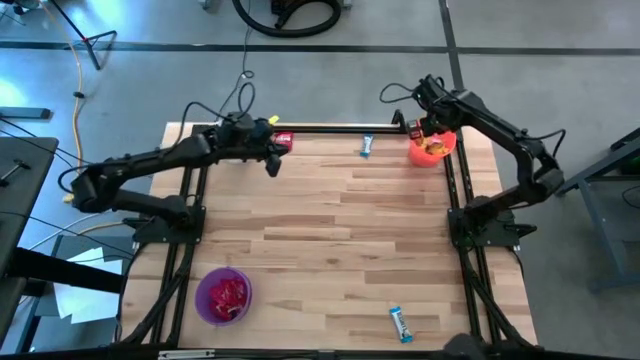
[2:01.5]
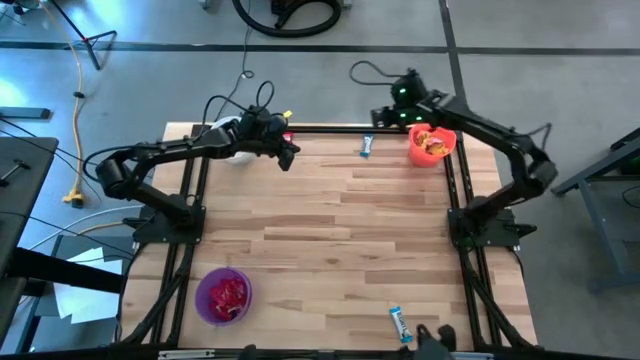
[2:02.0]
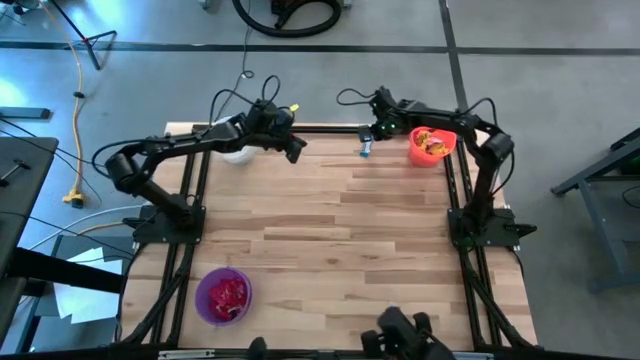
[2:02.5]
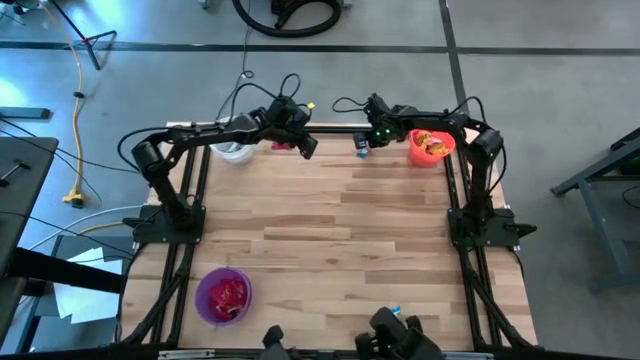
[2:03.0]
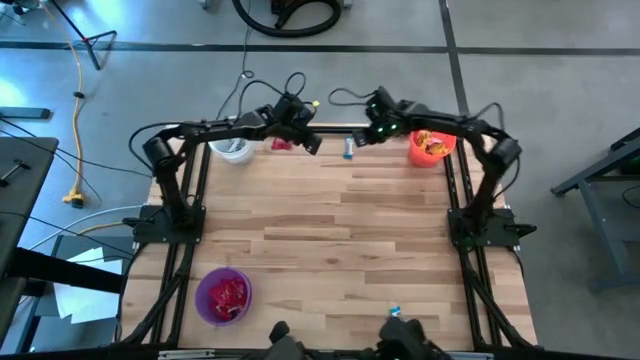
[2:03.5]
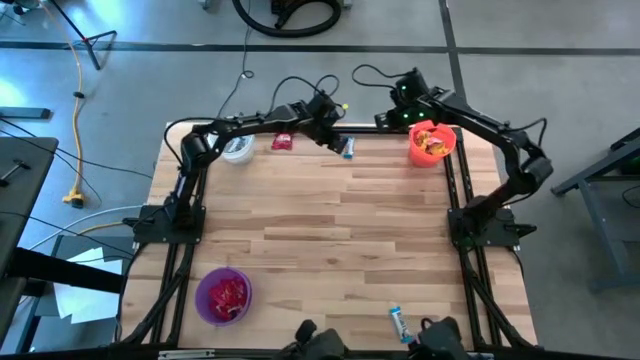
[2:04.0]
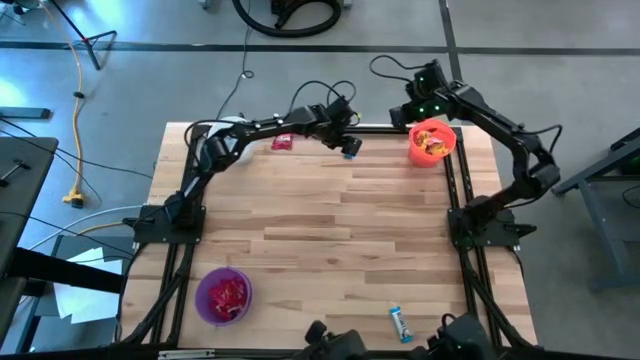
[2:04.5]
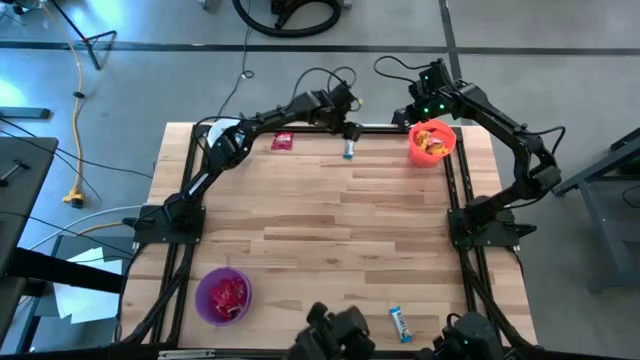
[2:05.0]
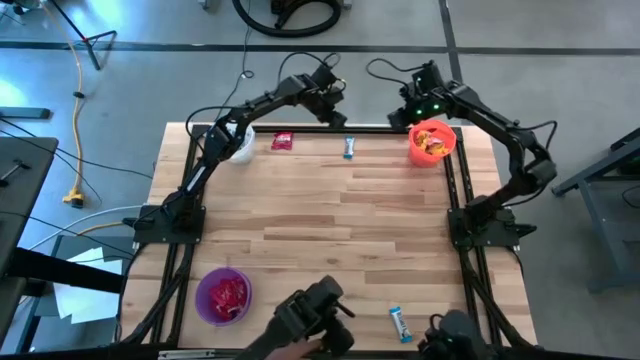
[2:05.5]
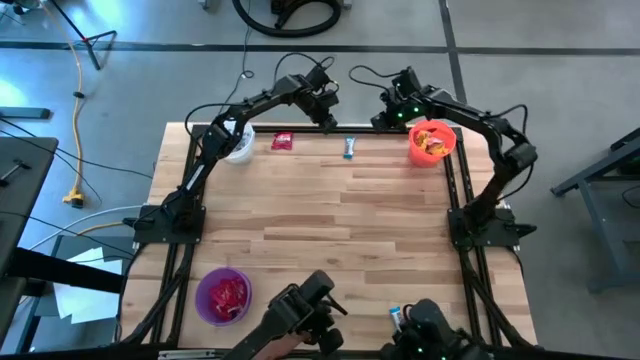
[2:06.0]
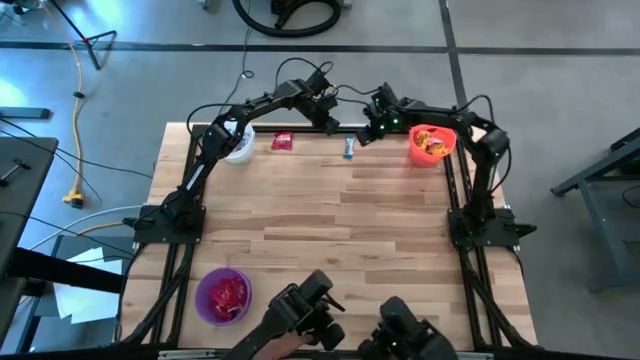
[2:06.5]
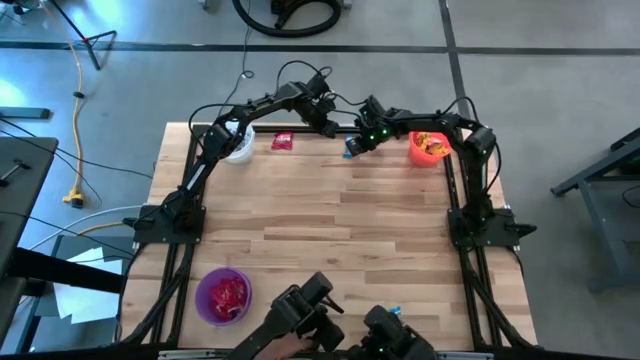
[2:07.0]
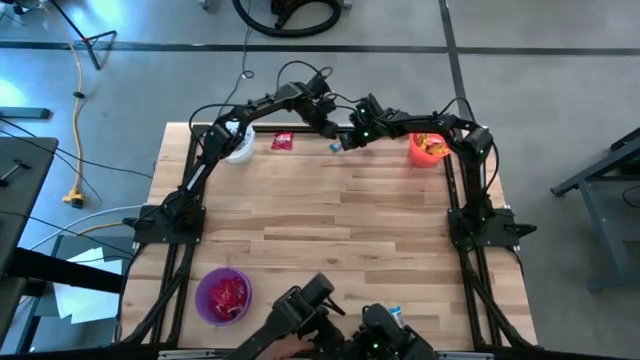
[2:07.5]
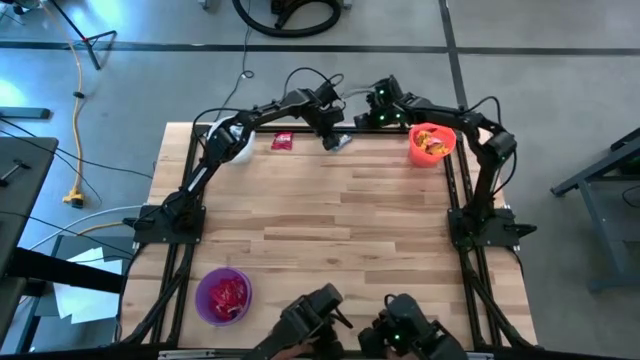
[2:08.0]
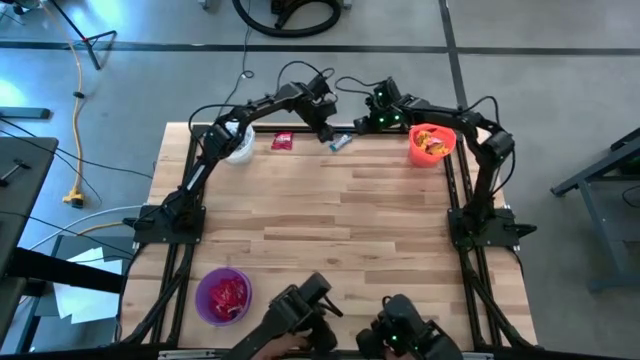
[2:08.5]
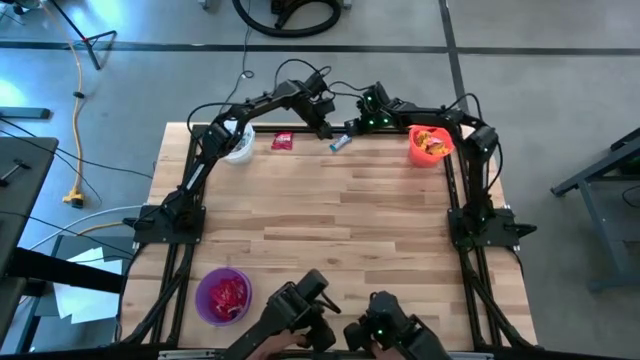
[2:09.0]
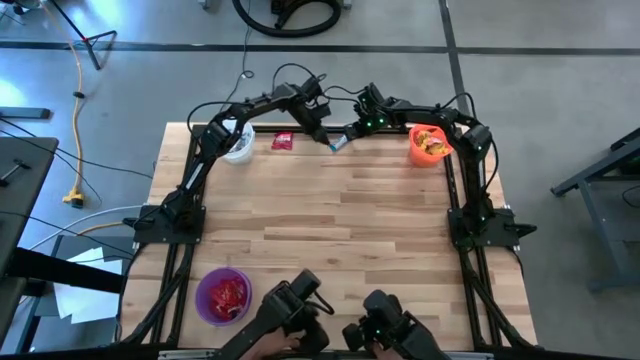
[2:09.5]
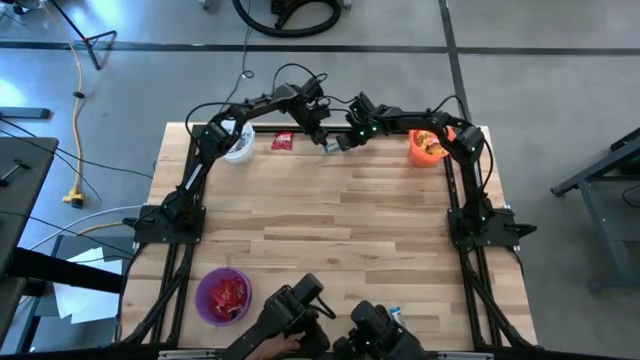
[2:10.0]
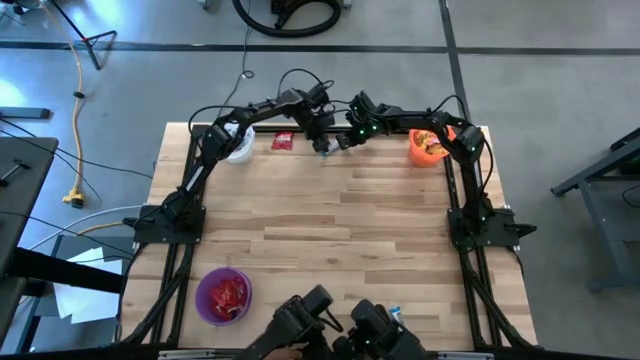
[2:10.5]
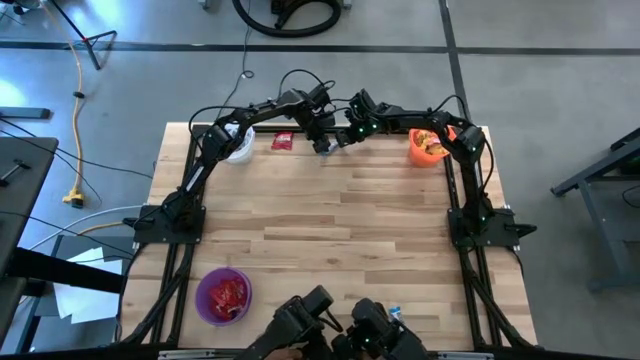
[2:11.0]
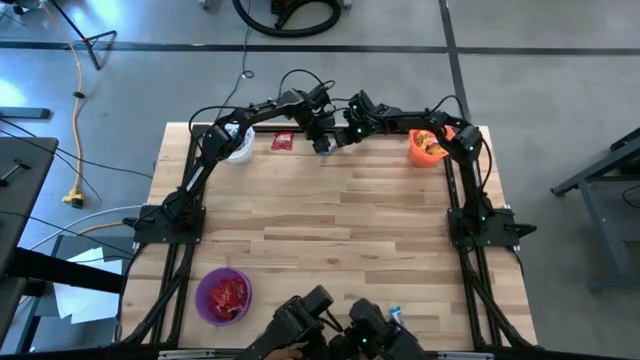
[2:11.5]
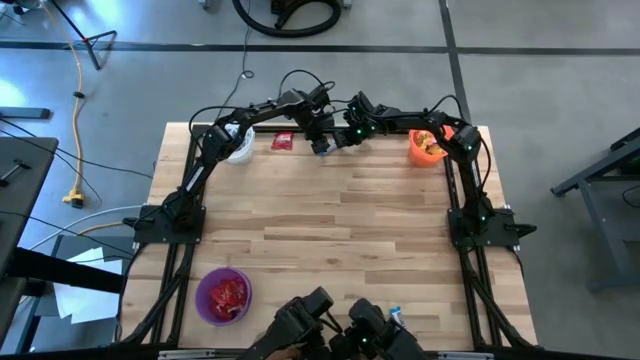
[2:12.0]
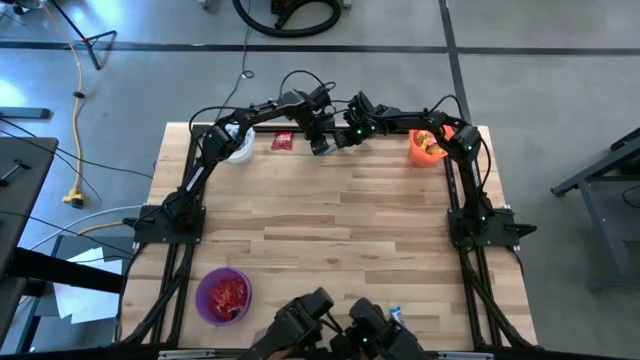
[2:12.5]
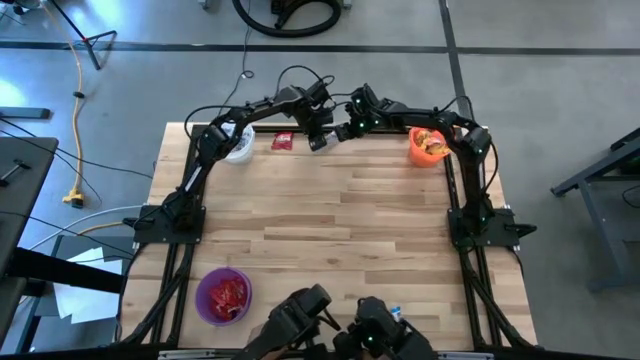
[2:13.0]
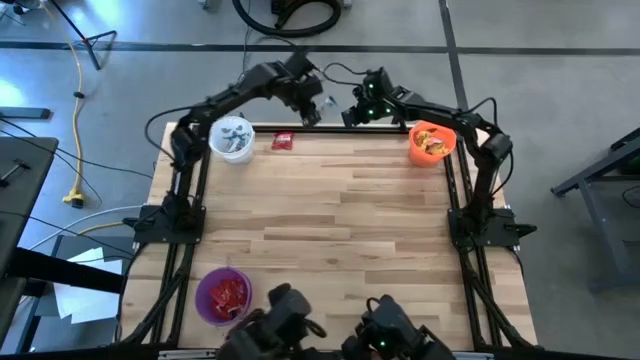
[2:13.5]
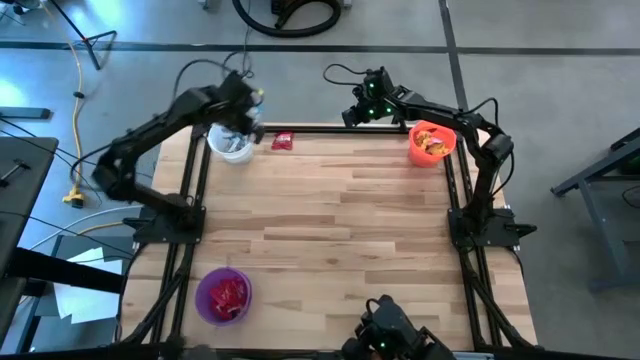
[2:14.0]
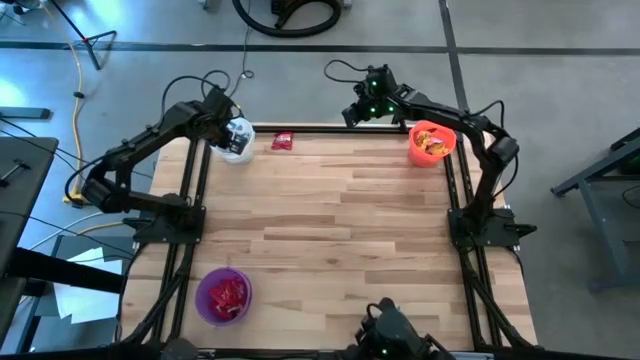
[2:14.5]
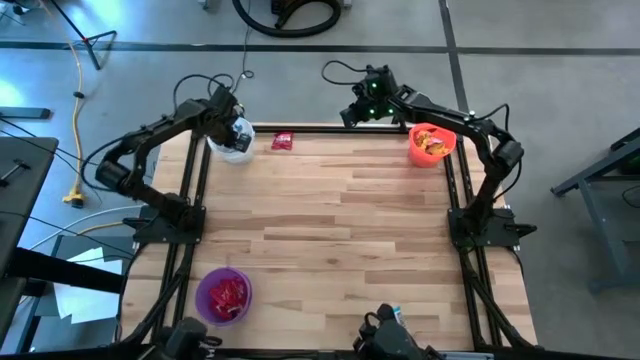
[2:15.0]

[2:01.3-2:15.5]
Task: Sort candy
Put the white candy into the white bucket

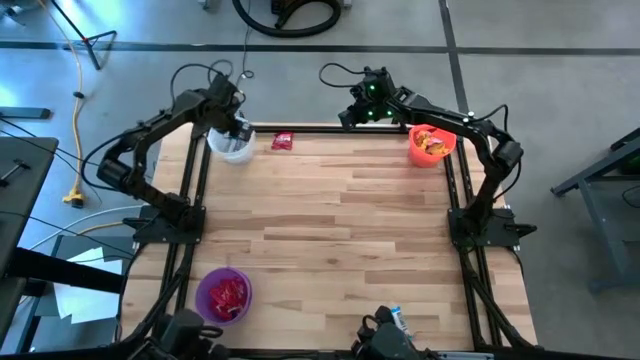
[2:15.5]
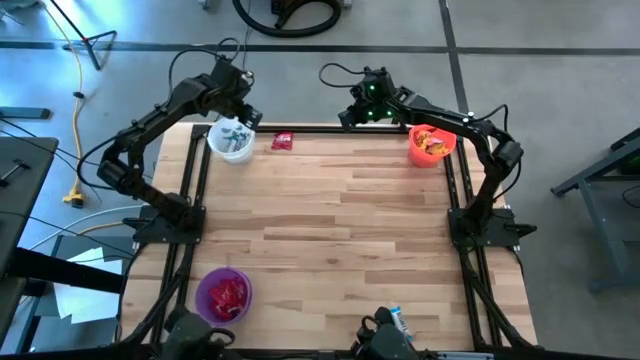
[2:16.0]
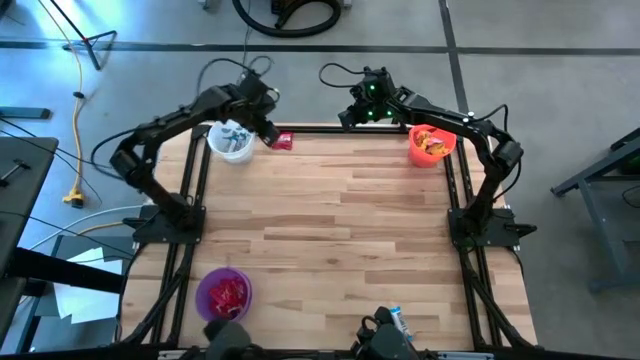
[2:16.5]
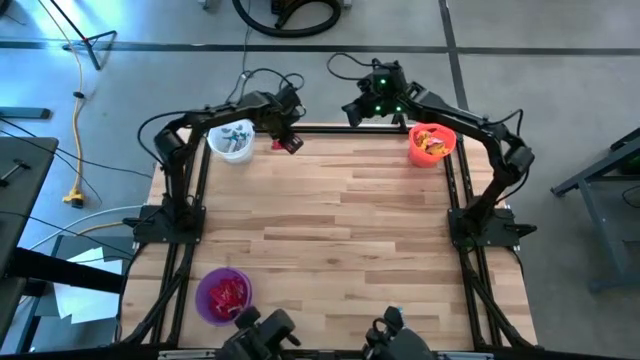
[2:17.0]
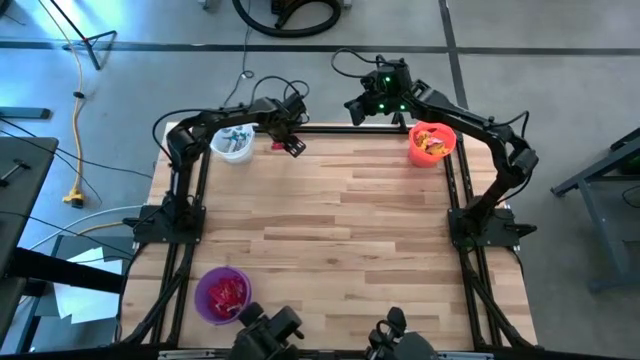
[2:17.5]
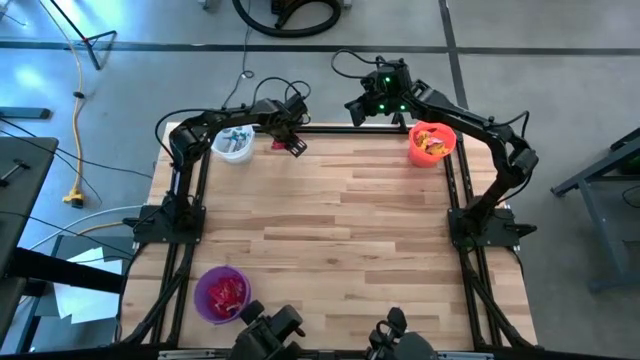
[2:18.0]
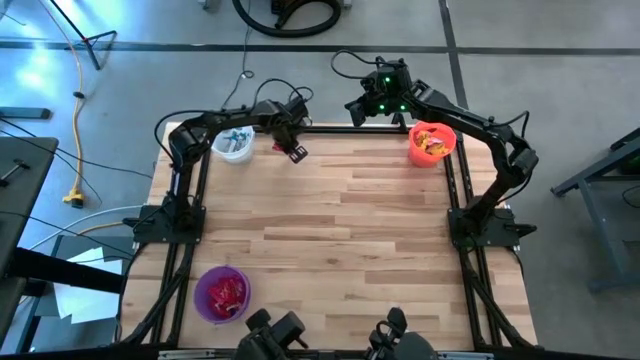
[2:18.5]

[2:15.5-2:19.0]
Put the red candy into the purple bucket

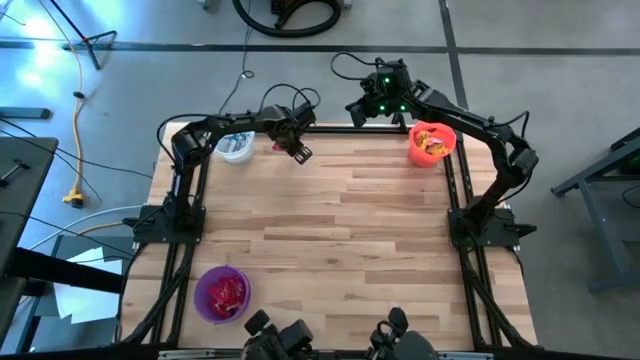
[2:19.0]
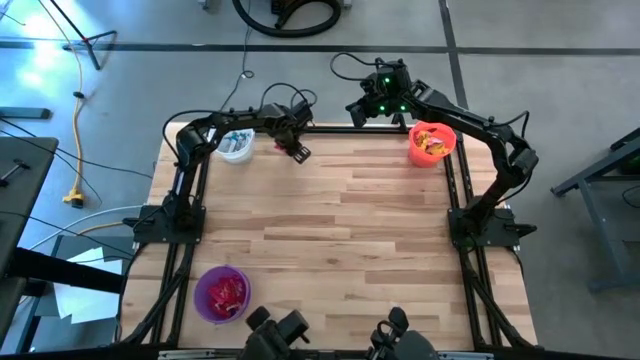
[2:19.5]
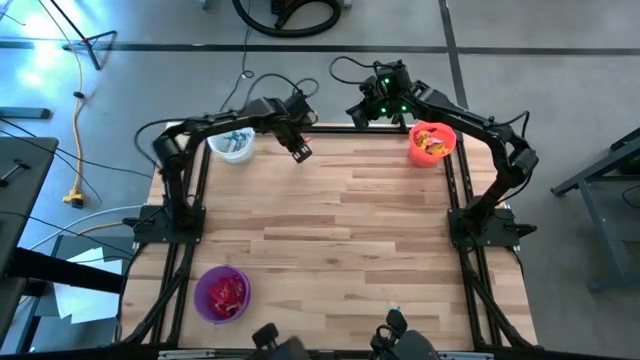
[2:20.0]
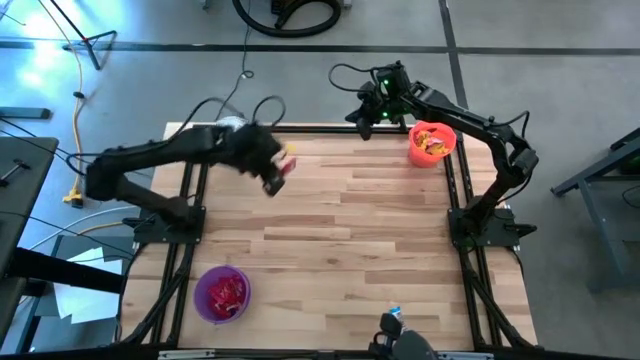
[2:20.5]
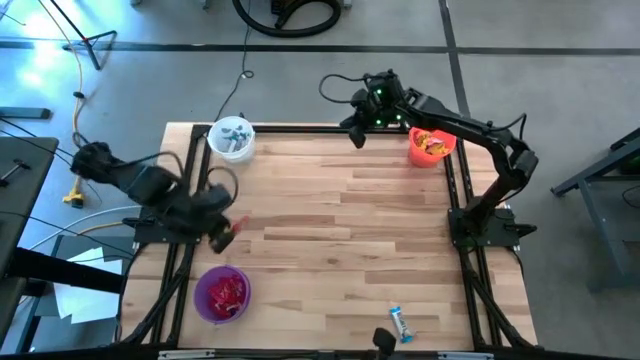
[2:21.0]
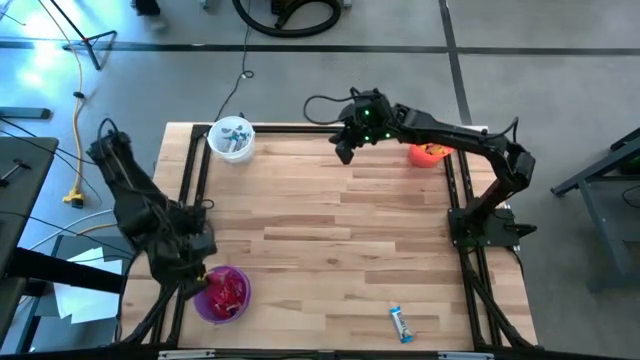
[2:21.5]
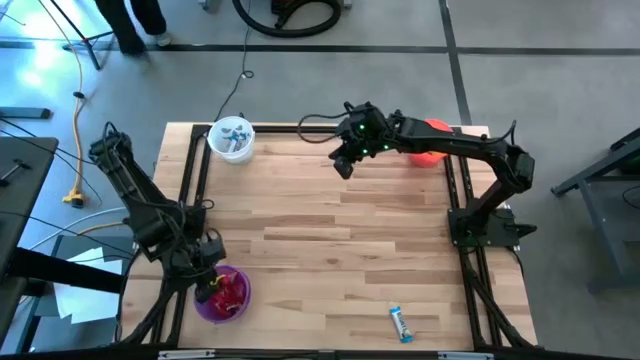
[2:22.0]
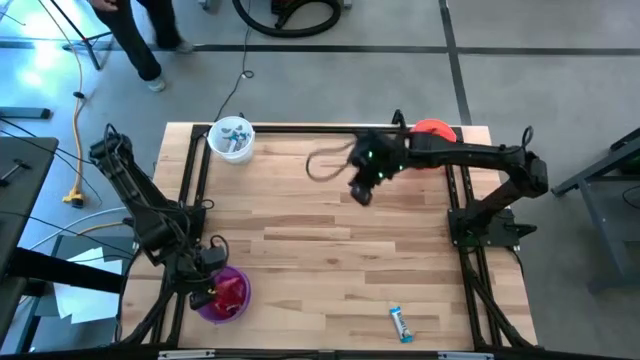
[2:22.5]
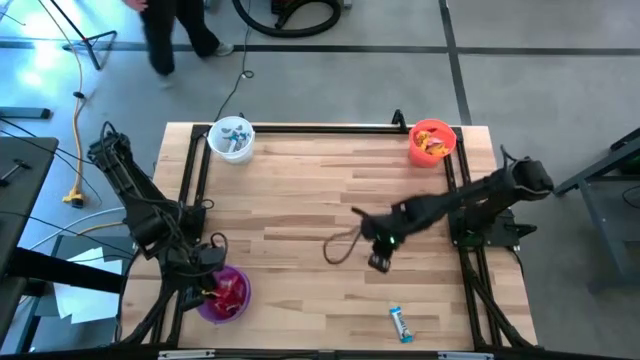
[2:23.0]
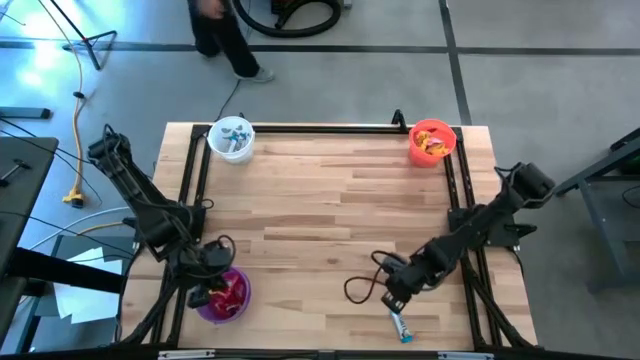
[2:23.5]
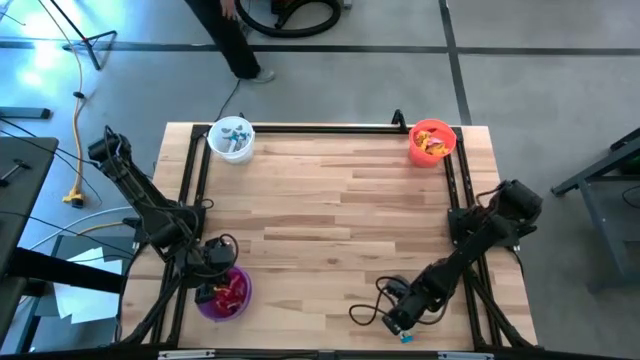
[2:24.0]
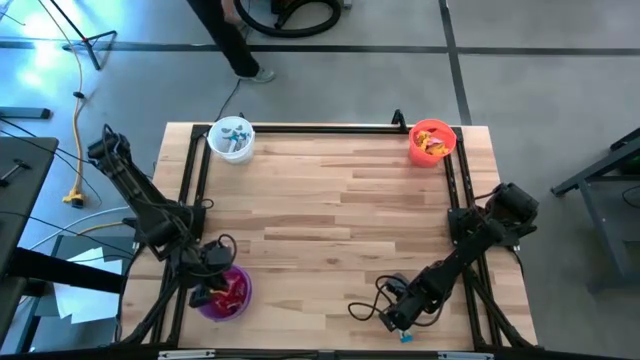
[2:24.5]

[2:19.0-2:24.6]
Put the red candy into the purple bucket

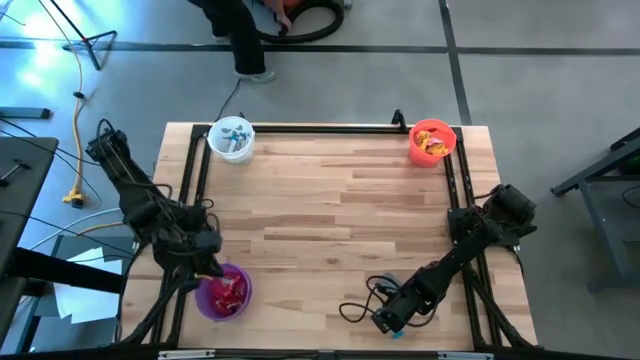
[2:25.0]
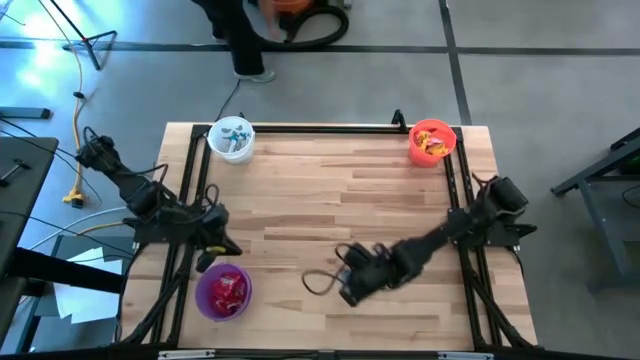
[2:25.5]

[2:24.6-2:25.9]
Put the white candy into the white bucket
